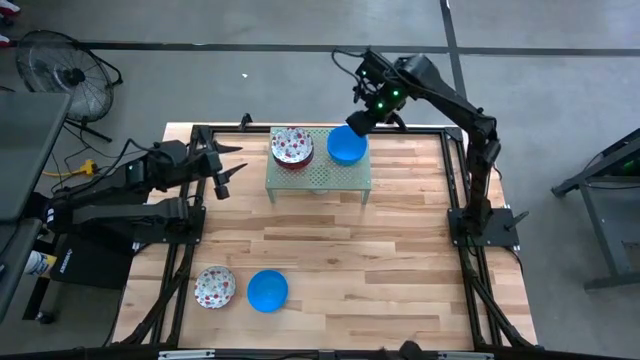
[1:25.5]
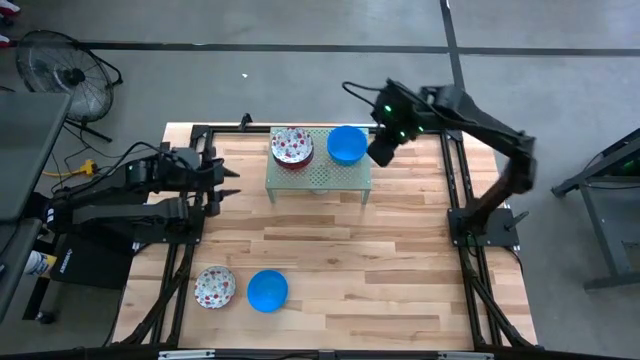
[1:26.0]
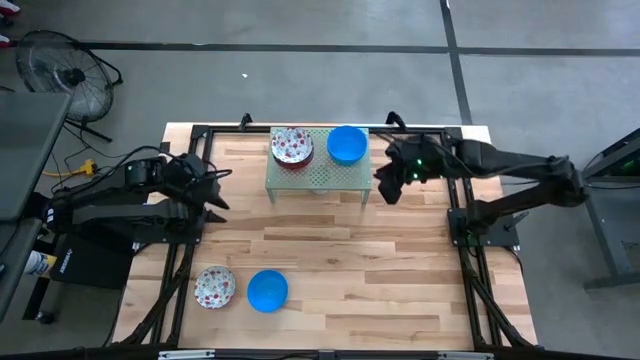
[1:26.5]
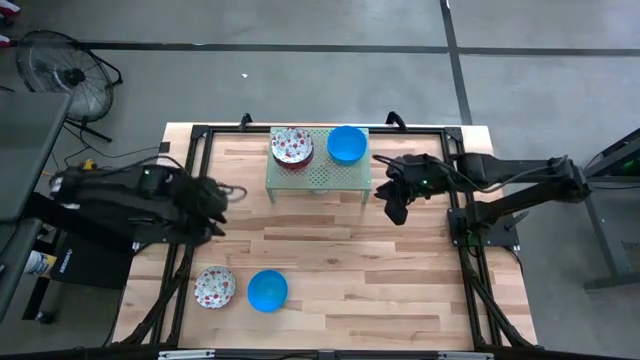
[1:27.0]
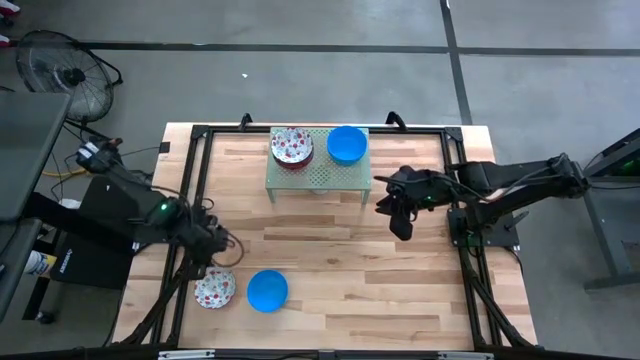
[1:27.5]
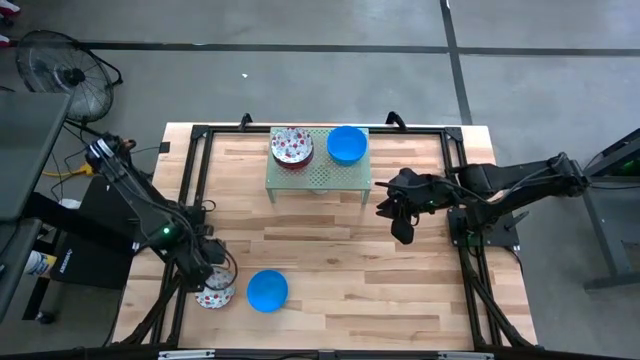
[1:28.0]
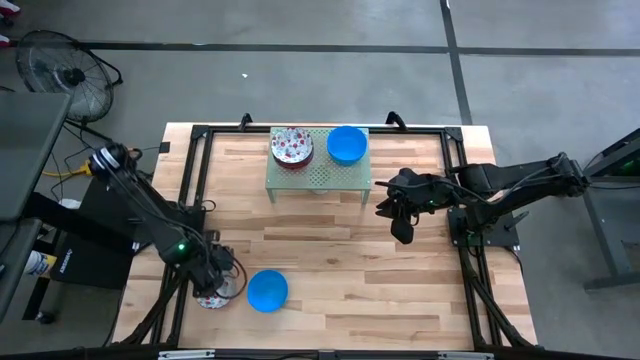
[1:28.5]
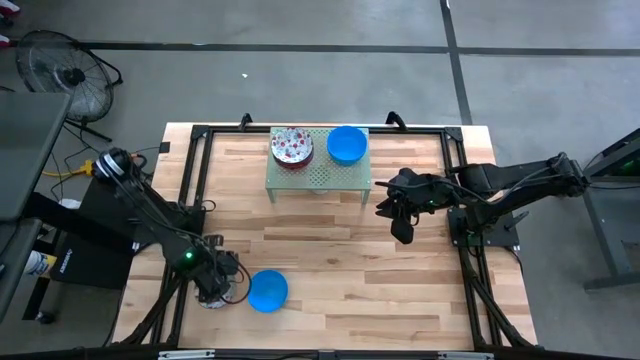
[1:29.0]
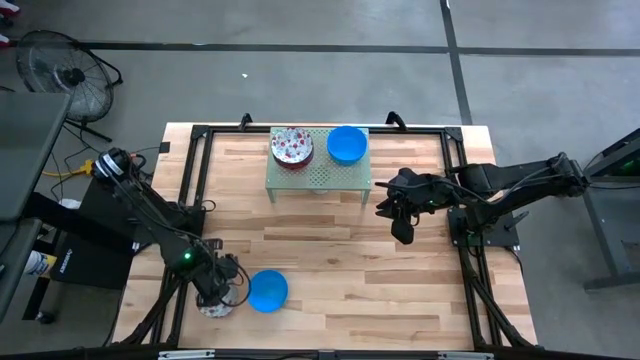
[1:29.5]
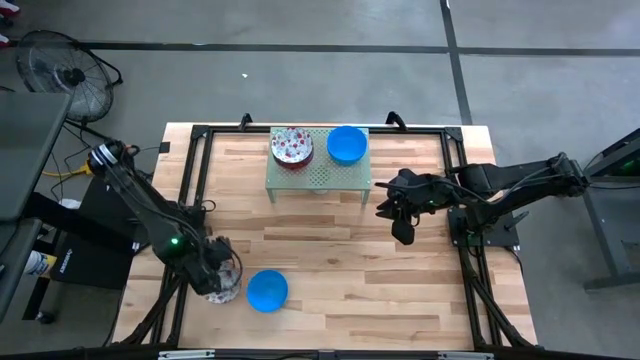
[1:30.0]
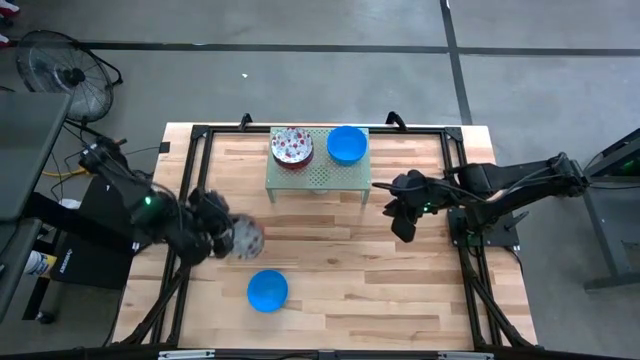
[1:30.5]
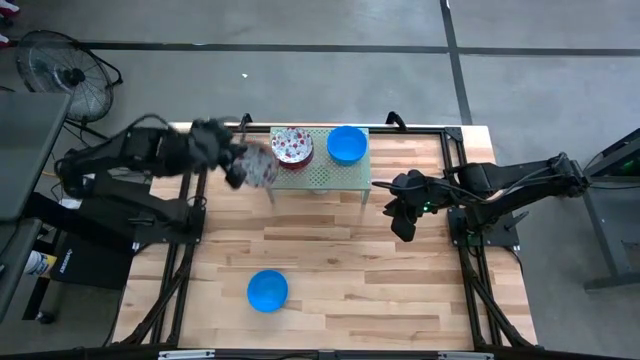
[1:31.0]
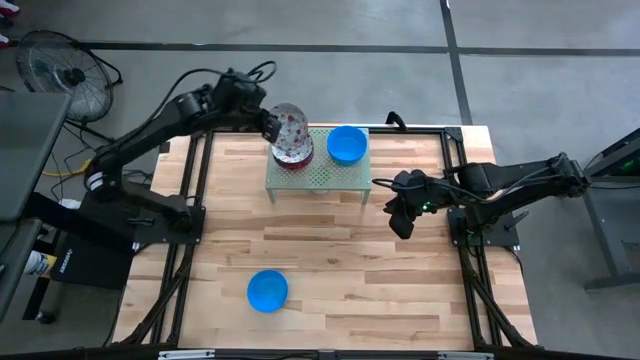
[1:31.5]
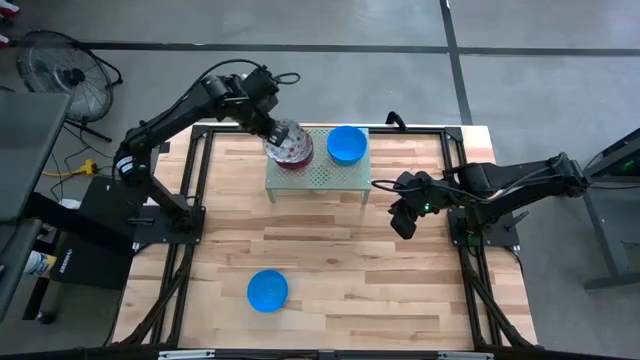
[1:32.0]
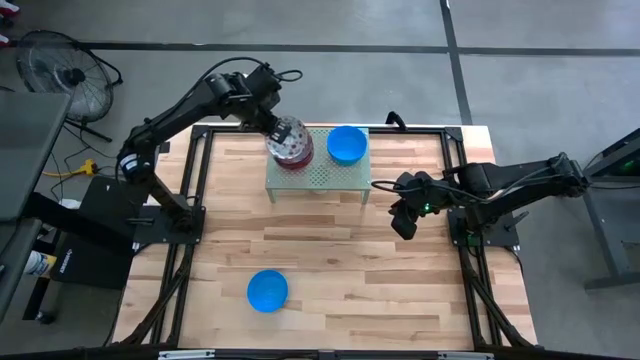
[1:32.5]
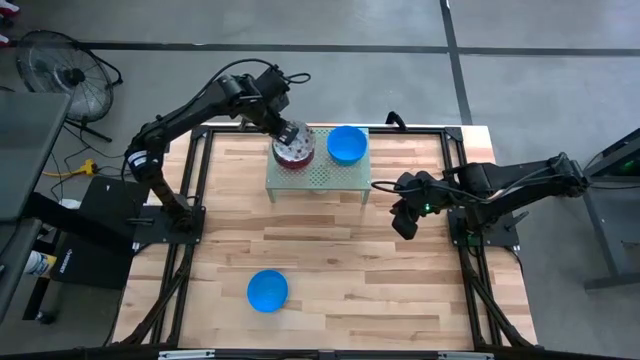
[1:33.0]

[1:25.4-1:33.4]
Task: Pick & Place Mini bowls
Stack the red patterned bowl on the red patterned bowl on the shelf

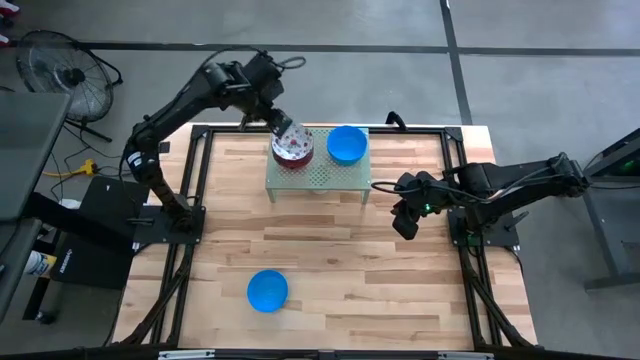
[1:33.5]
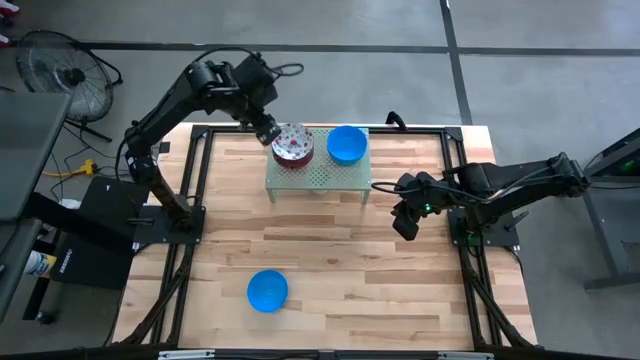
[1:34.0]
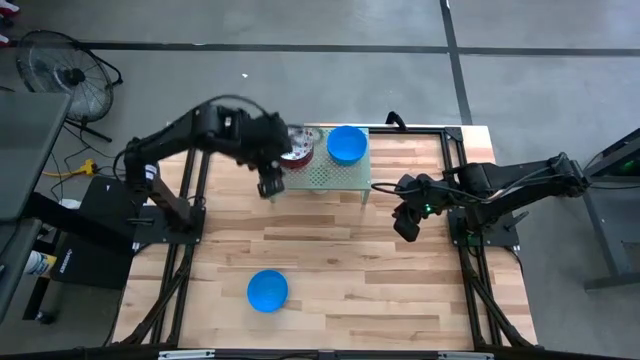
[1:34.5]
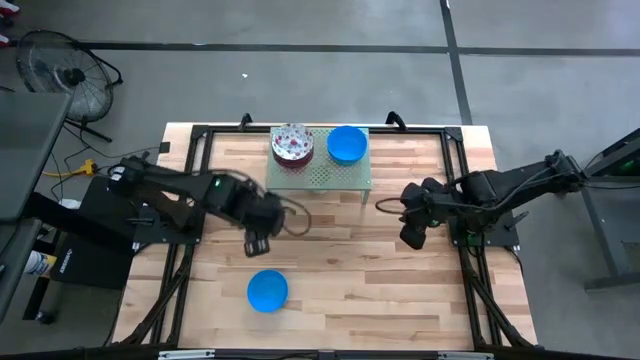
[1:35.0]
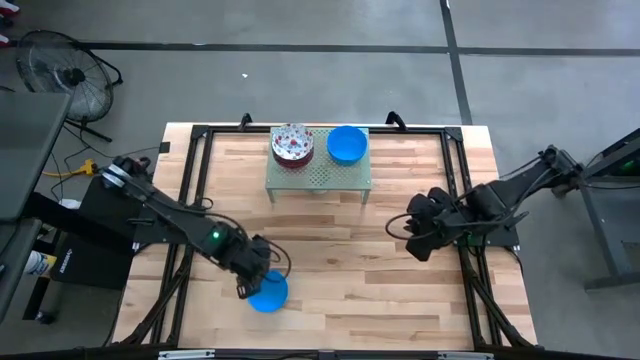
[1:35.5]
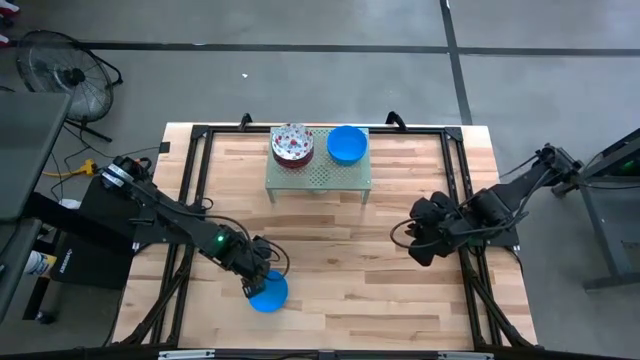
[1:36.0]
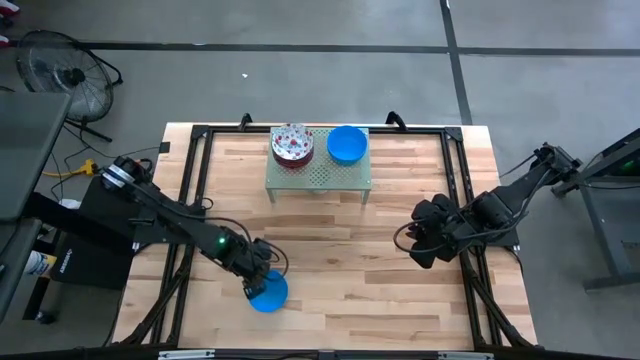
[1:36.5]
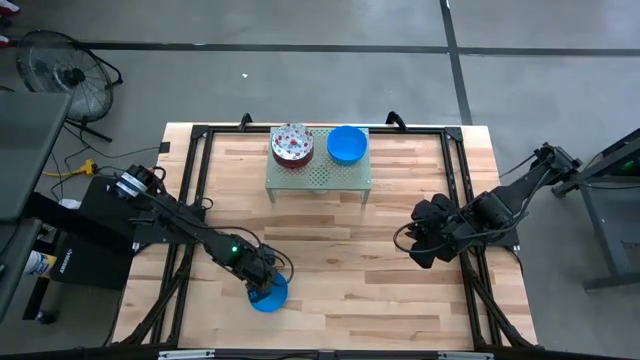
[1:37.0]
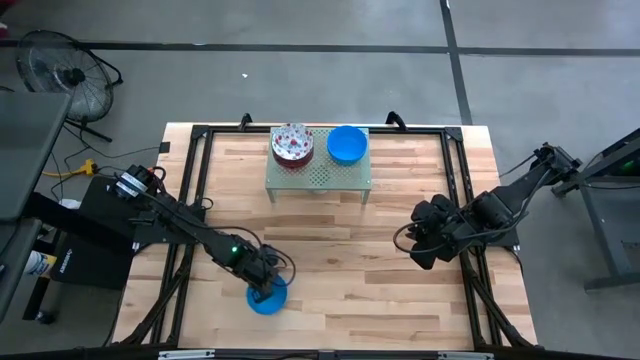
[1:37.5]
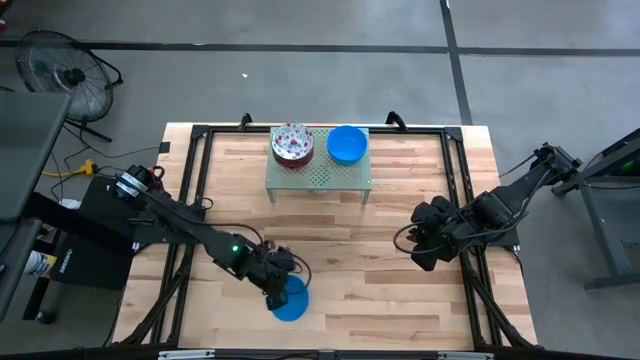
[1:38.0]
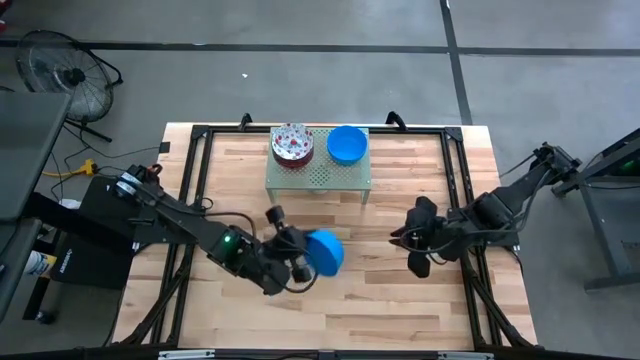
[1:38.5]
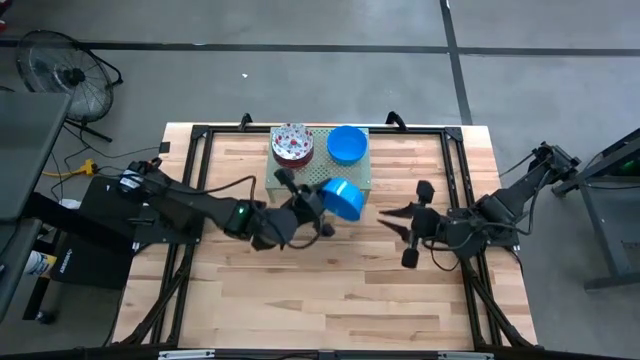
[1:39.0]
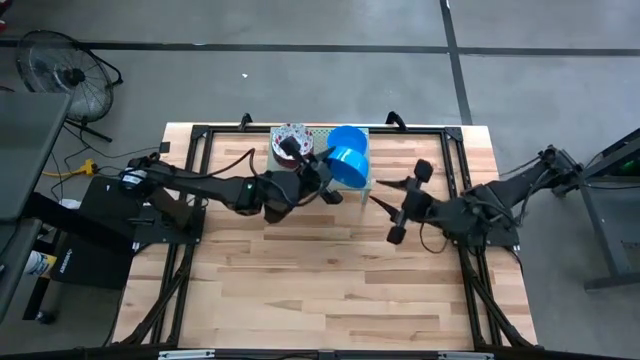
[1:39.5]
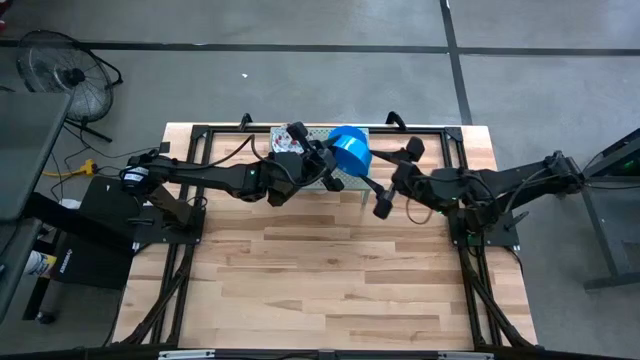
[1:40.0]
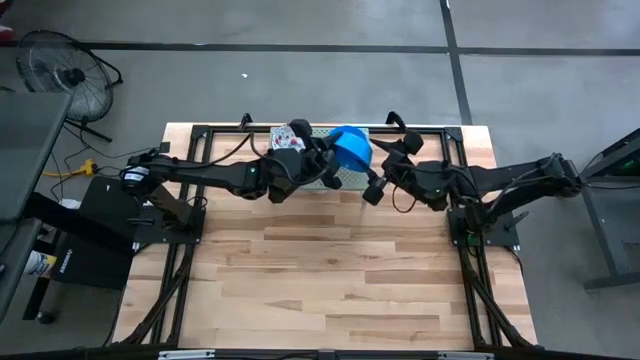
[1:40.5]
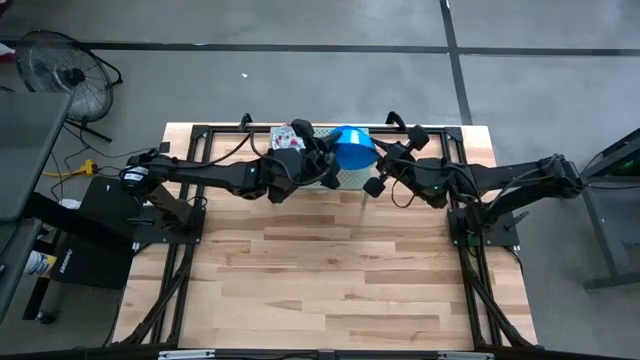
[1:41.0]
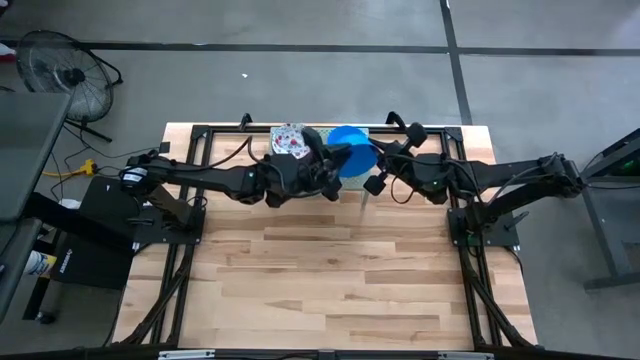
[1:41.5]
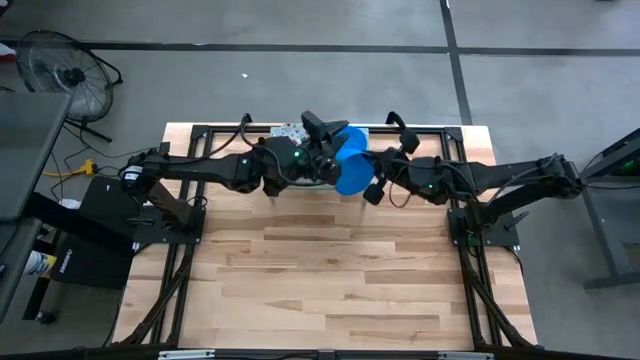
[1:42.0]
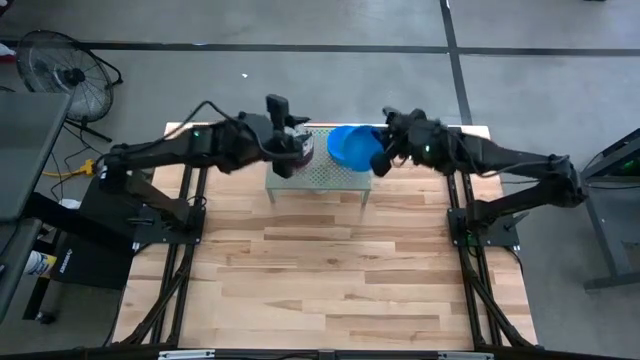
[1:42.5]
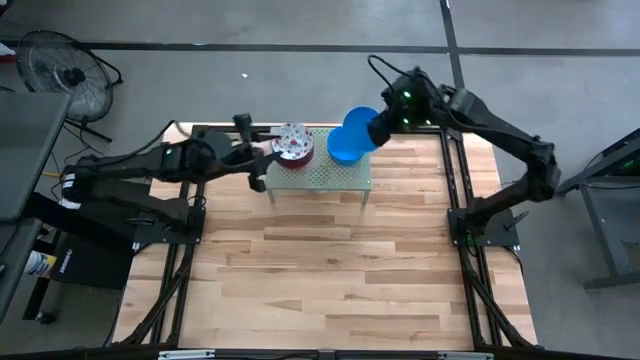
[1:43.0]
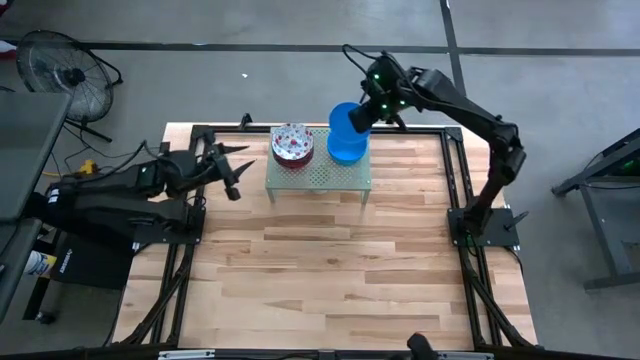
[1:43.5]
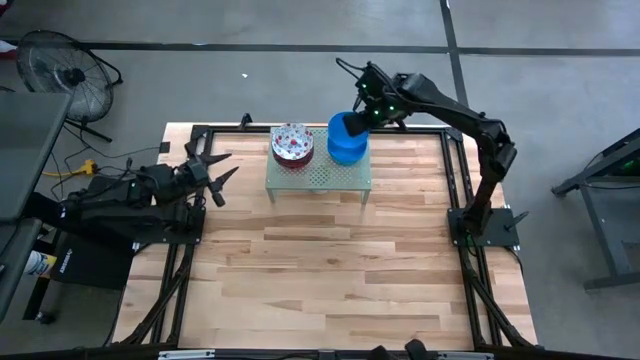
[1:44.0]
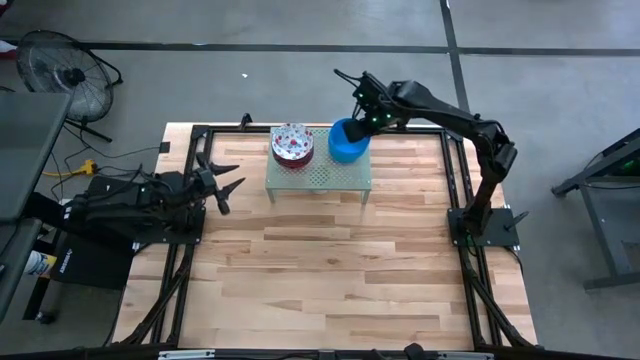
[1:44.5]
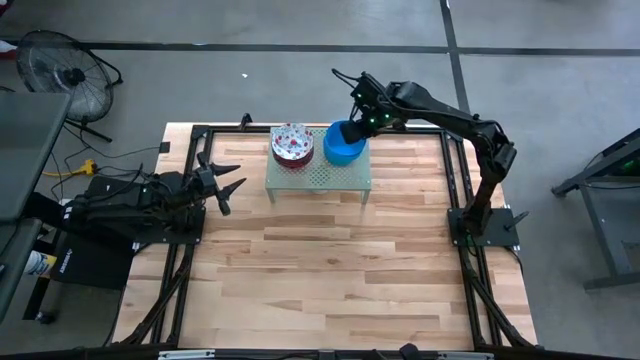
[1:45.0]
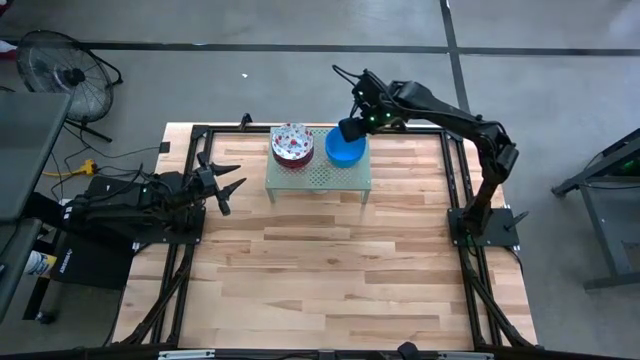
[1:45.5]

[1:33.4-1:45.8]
Stack the blue bowl on the blue bowl on the shelf

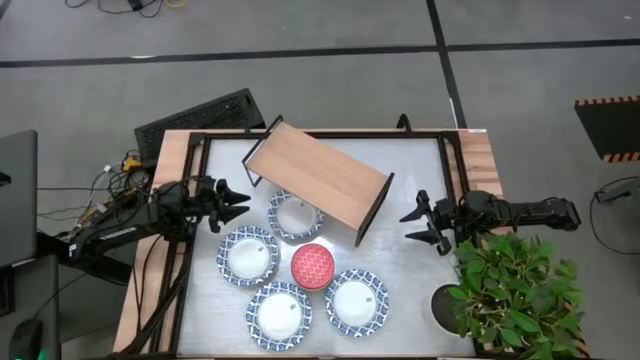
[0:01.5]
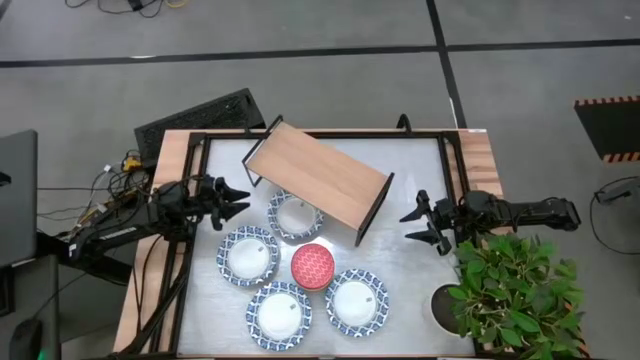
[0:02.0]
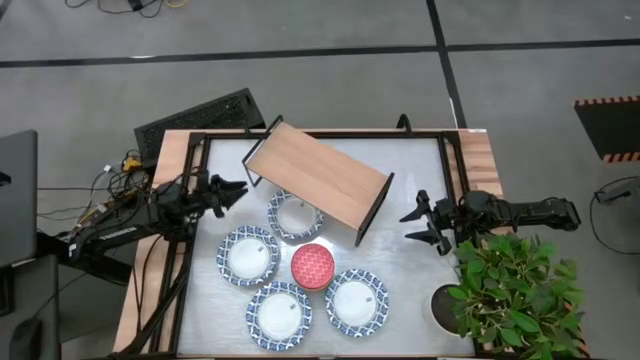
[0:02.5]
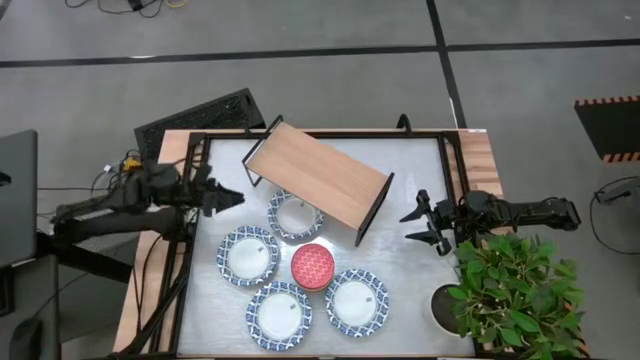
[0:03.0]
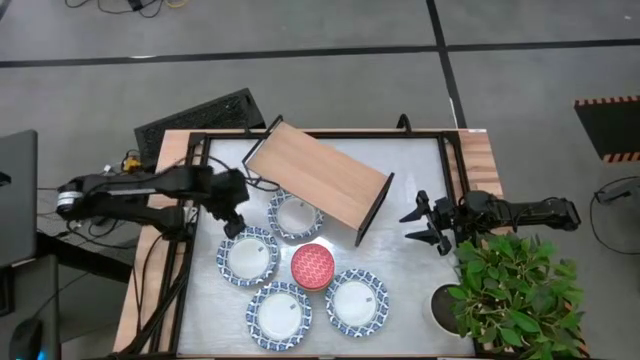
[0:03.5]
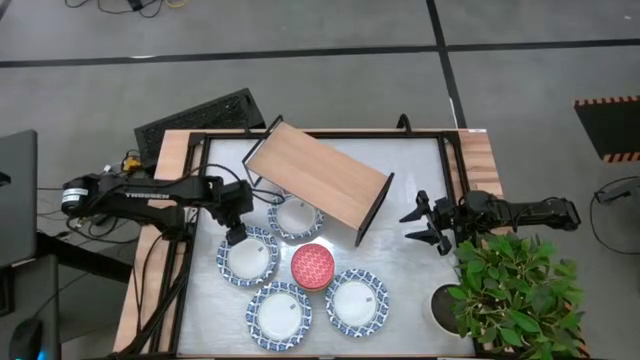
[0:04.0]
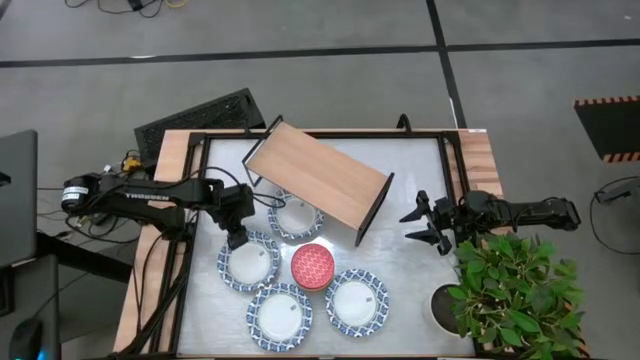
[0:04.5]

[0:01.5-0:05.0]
Task: Place and stack bowls onto a shelf
Put the left white bowl to the left on the shelf
